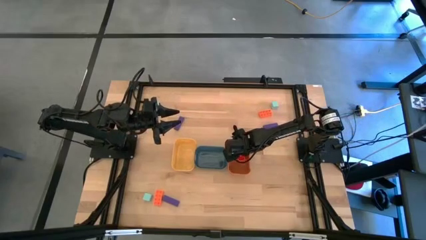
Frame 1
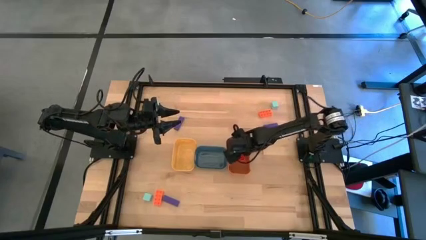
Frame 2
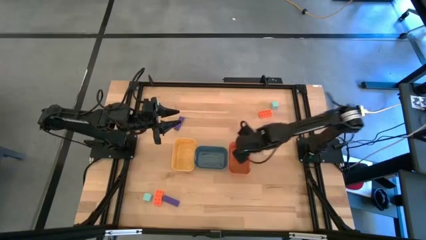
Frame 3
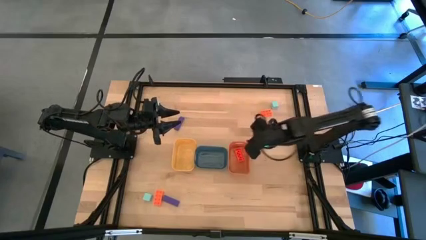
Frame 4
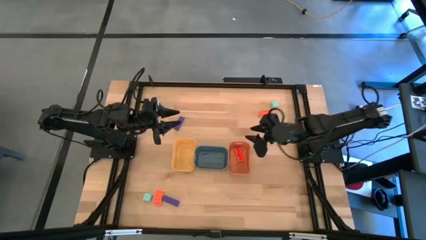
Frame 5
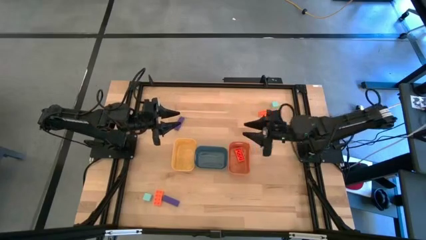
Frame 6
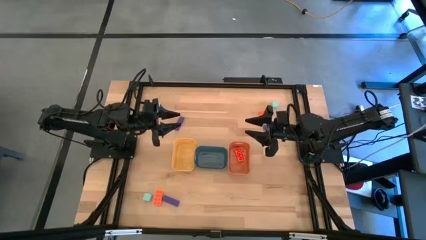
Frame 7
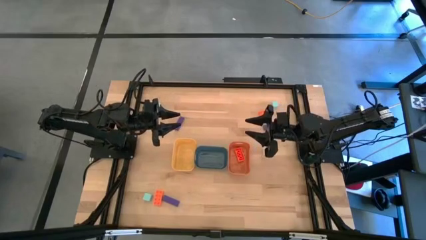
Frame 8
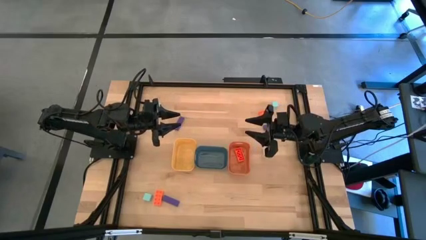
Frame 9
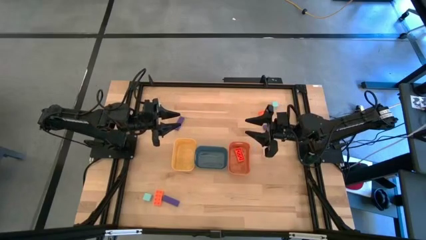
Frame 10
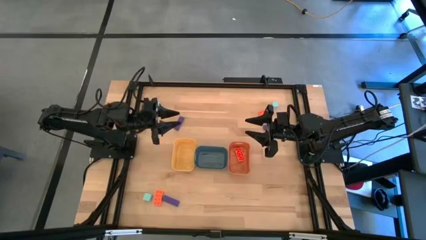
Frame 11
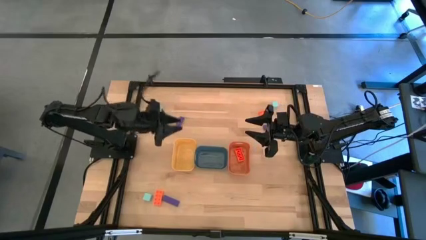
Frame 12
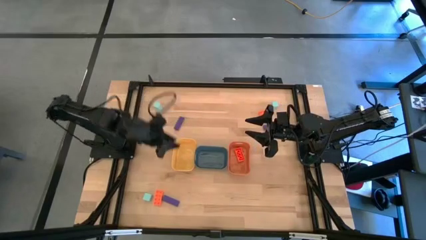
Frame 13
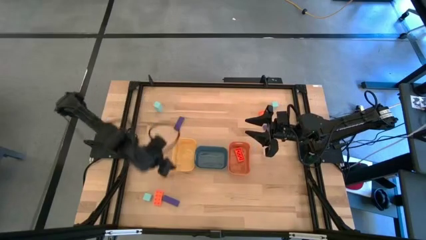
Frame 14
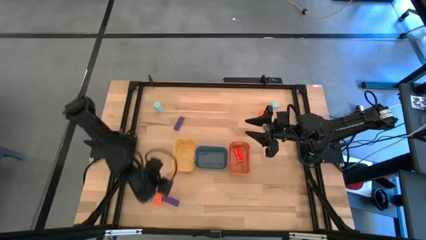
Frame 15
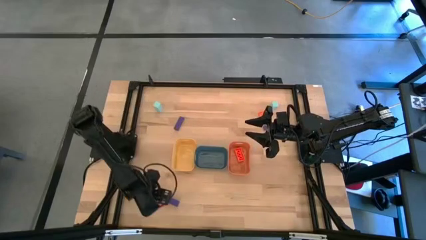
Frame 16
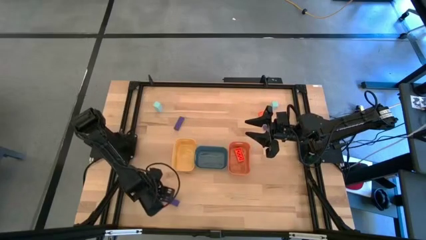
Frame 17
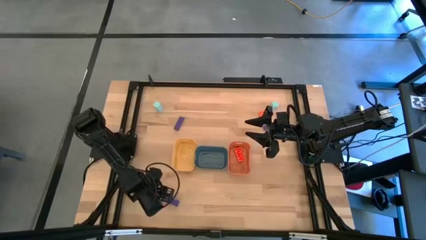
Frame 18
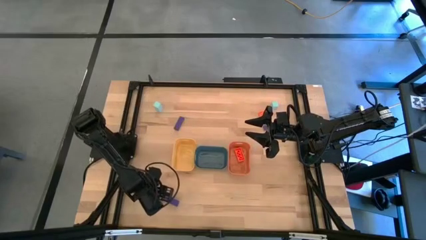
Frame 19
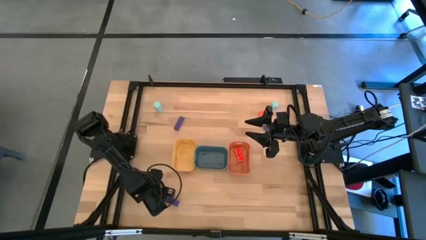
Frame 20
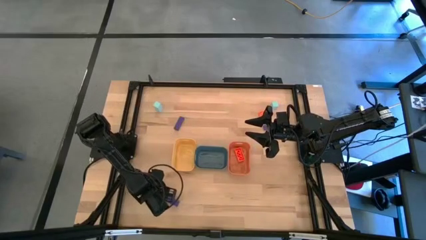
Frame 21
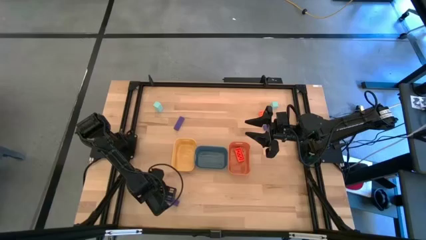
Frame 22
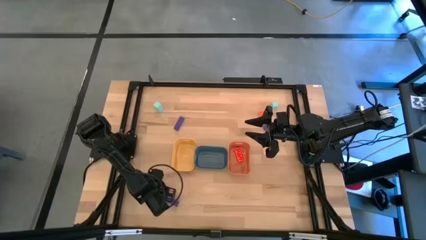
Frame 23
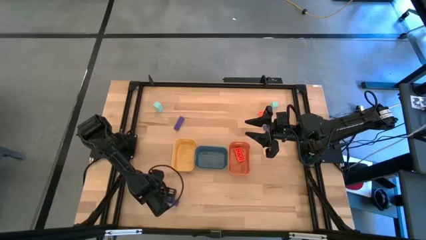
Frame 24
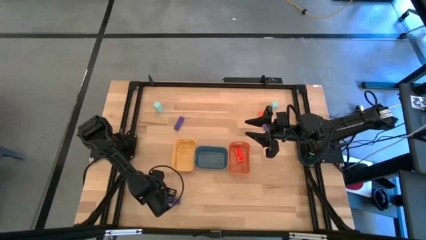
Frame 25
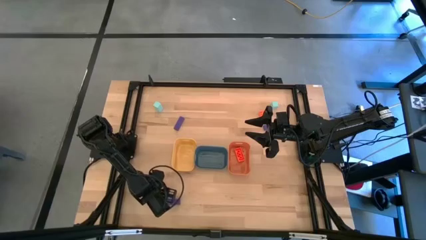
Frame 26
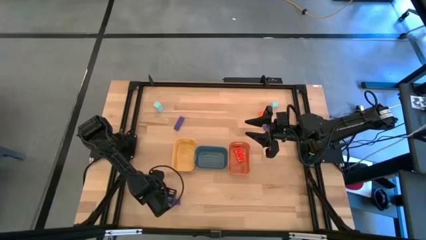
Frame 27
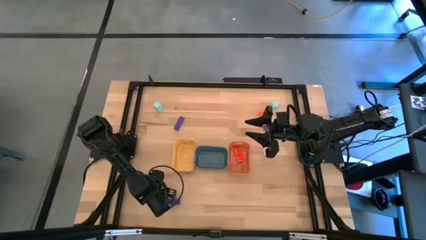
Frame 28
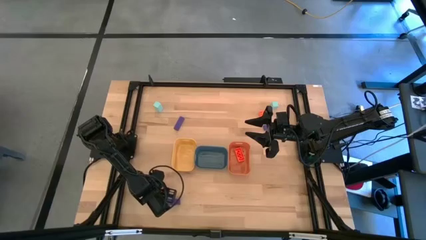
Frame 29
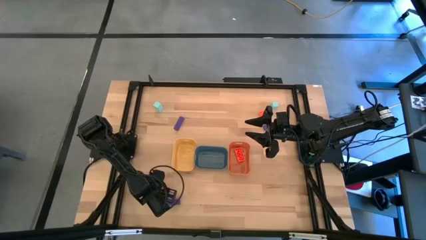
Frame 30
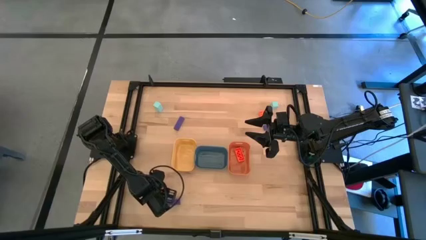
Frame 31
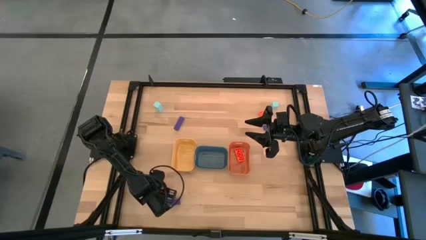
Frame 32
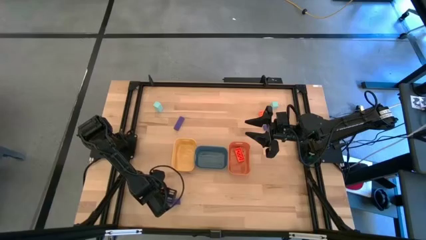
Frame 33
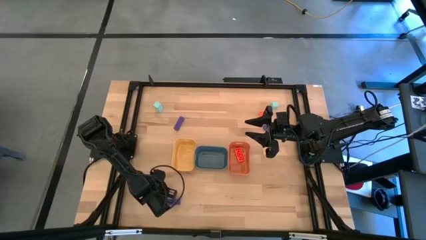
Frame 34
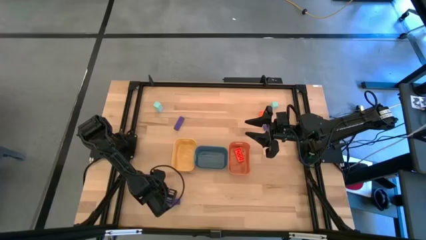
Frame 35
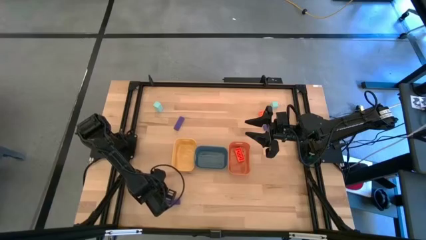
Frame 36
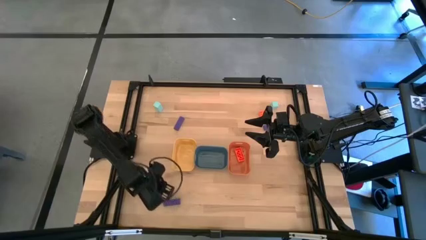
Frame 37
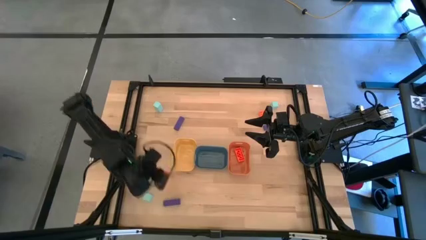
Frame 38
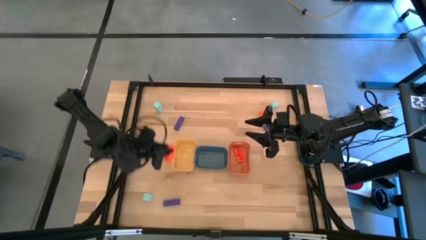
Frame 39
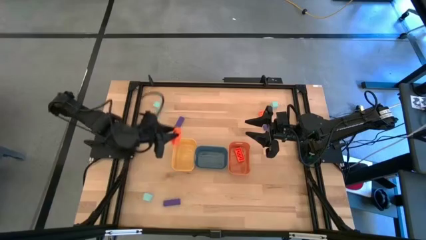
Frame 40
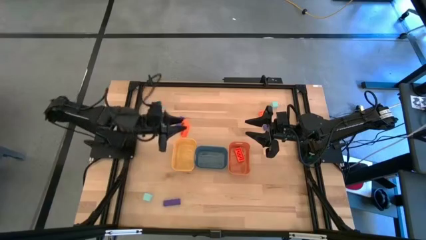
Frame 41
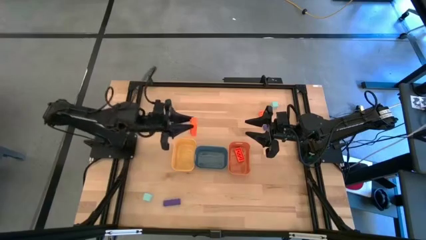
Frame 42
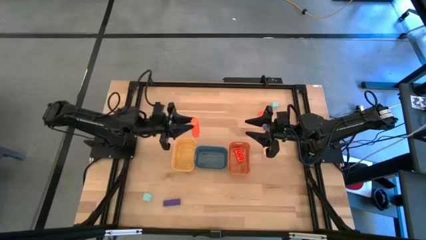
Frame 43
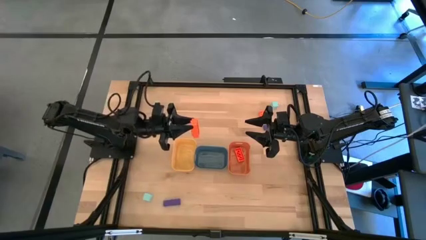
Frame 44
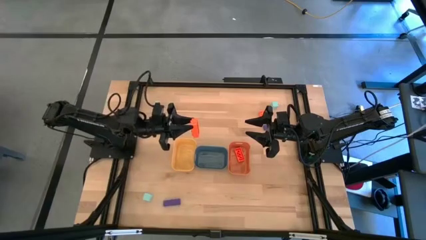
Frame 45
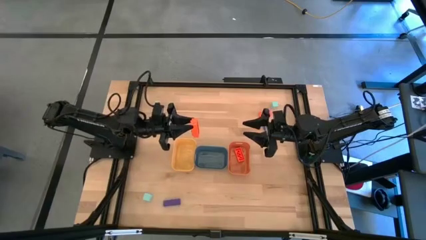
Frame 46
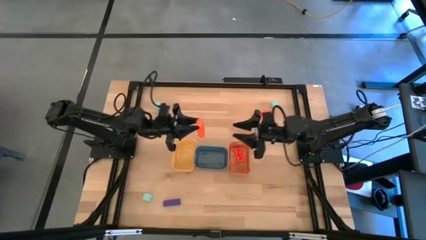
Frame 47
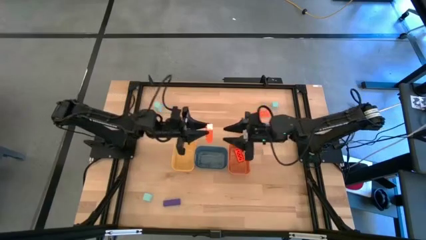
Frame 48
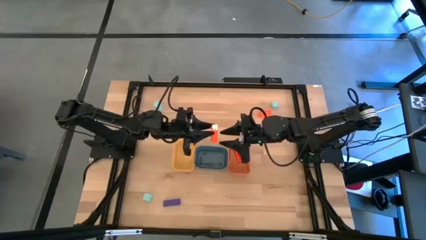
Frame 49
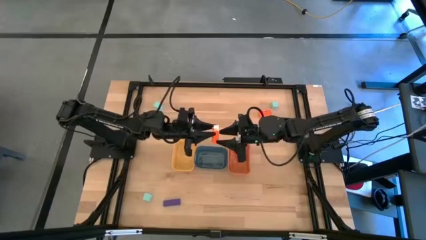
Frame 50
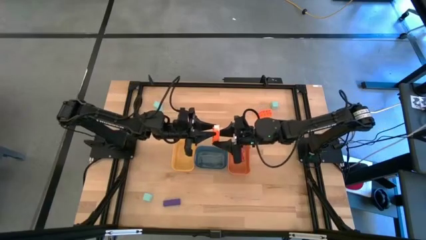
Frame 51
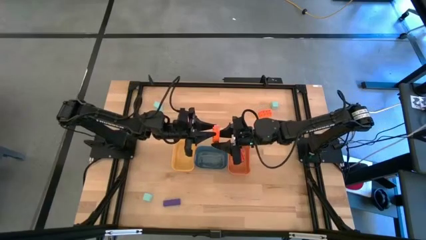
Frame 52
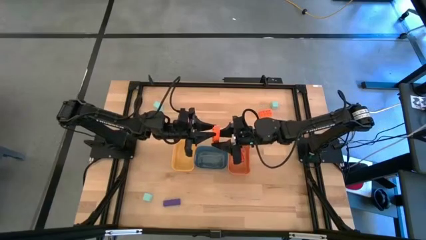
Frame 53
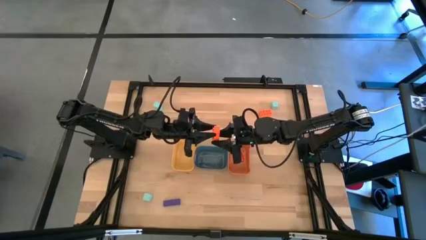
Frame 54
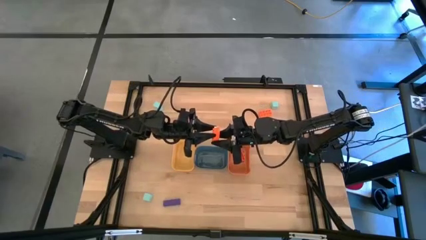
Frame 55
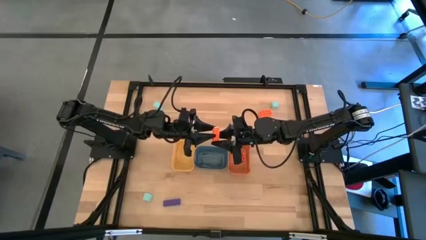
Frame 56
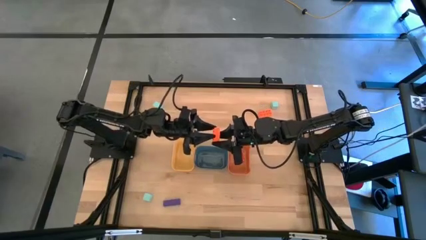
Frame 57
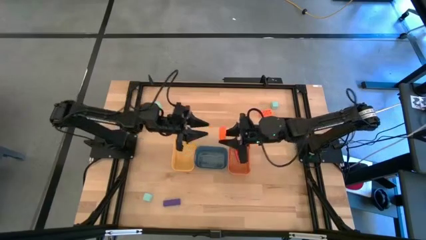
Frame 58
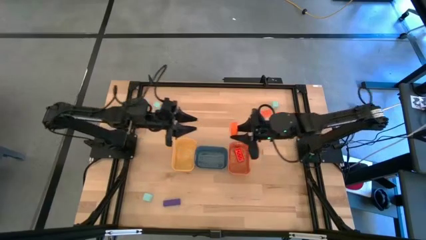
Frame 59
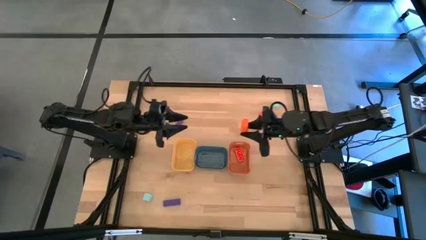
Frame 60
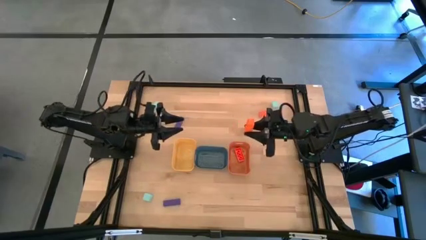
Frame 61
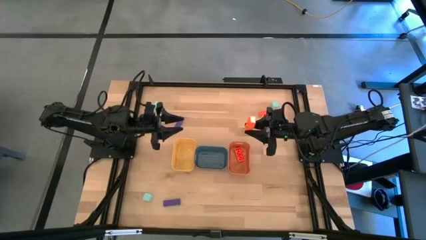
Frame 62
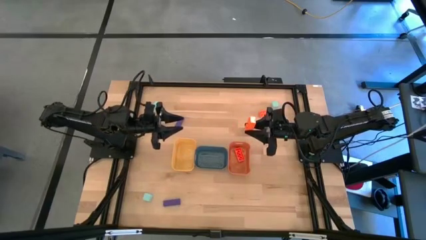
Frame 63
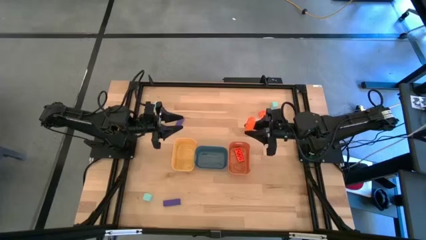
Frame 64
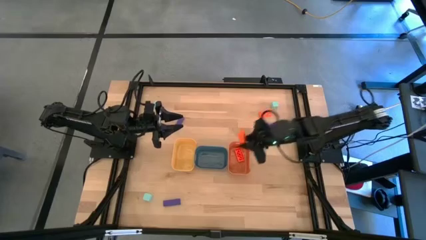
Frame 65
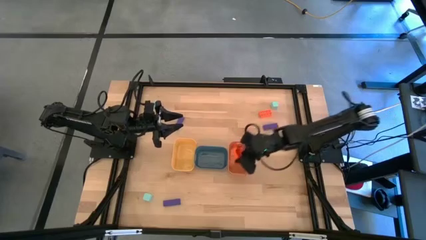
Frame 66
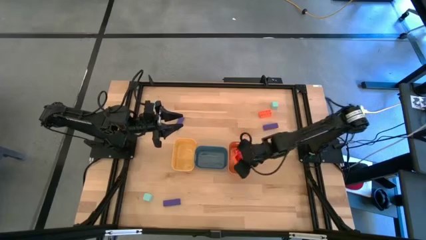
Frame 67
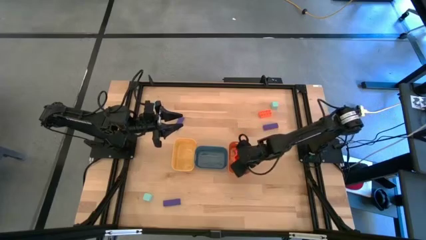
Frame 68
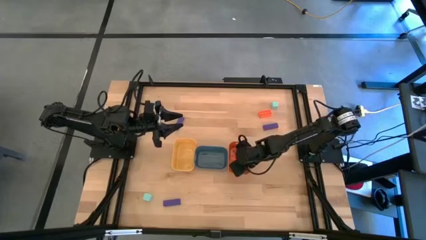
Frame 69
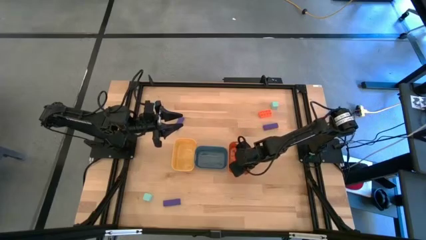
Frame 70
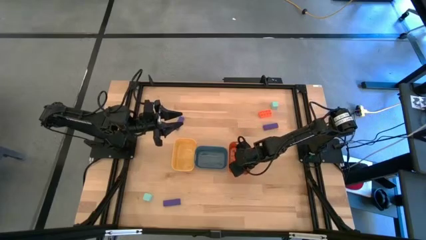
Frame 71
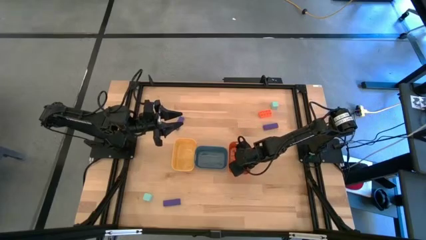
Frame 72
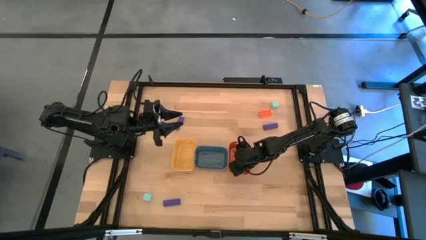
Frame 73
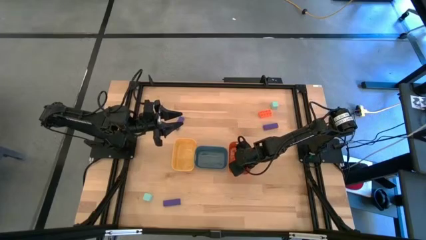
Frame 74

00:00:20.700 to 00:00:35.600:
Task: Sort & place blocks by color
Put the bottom orange game piece into the orange bin
